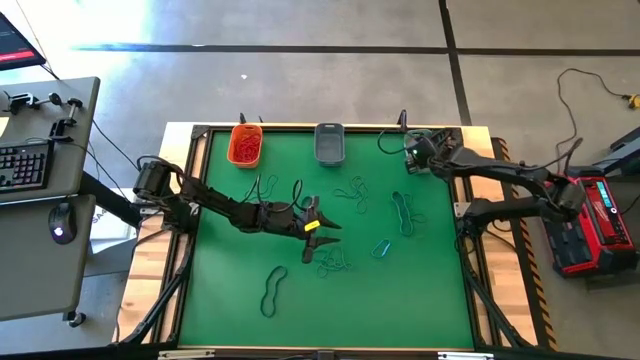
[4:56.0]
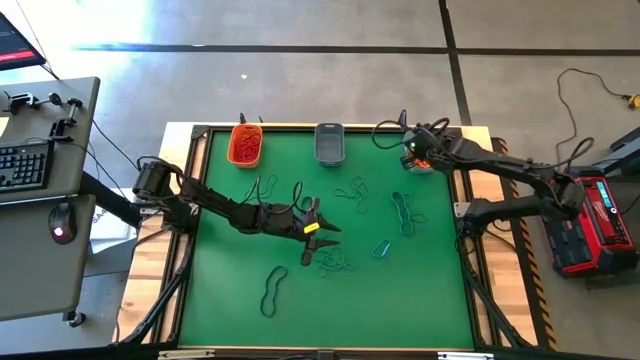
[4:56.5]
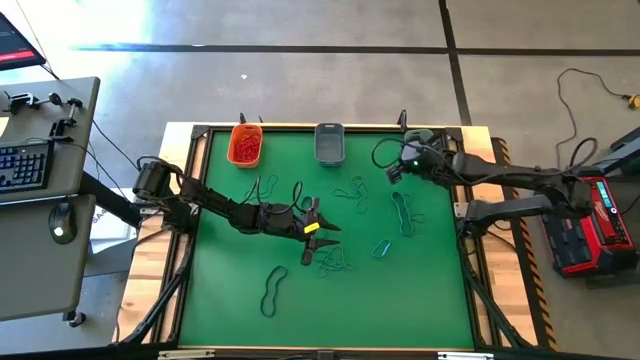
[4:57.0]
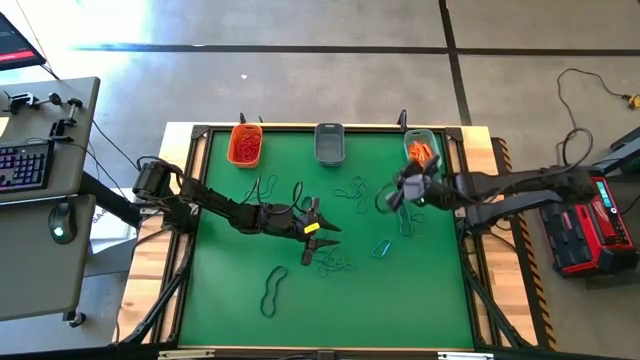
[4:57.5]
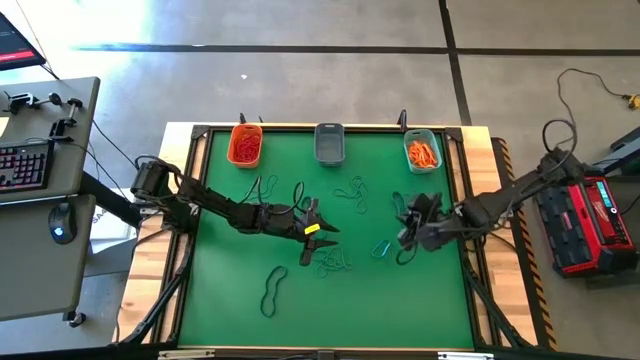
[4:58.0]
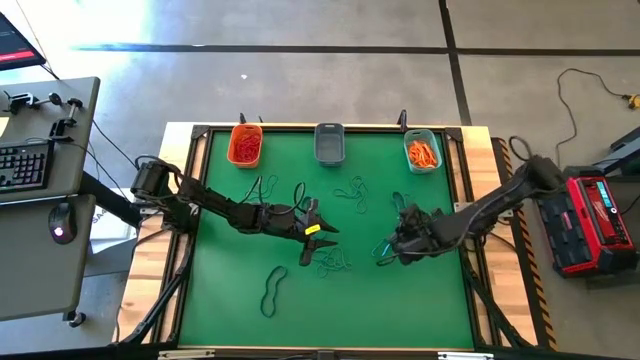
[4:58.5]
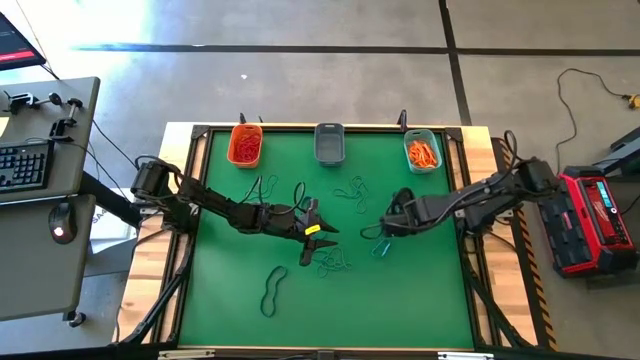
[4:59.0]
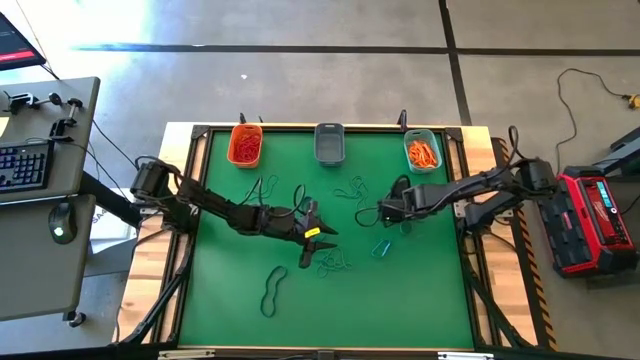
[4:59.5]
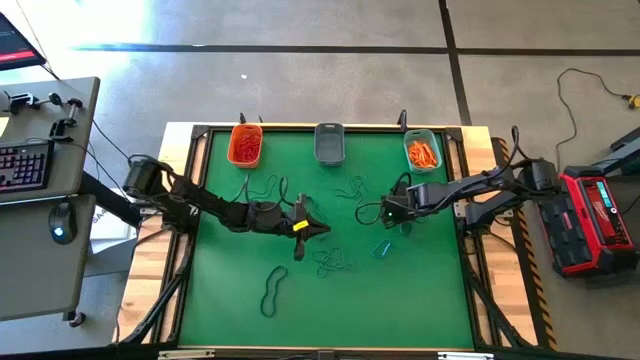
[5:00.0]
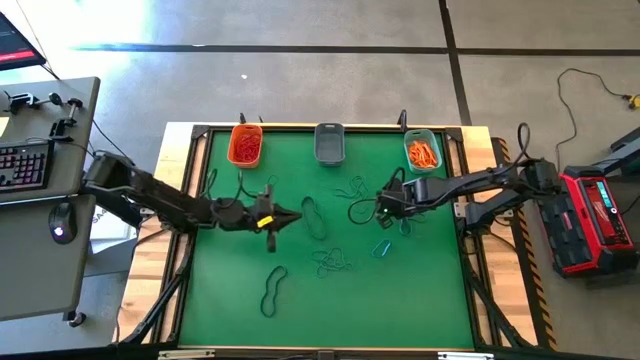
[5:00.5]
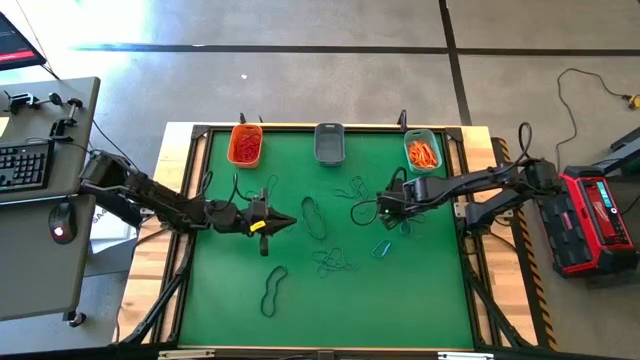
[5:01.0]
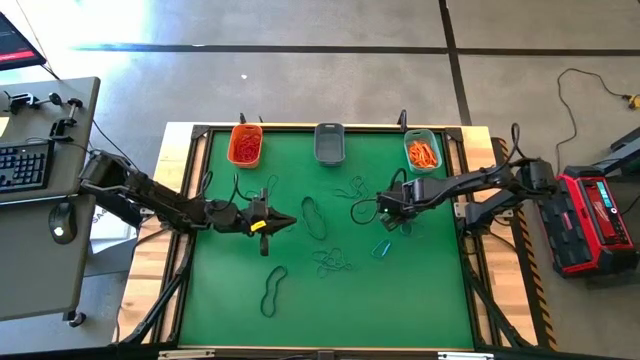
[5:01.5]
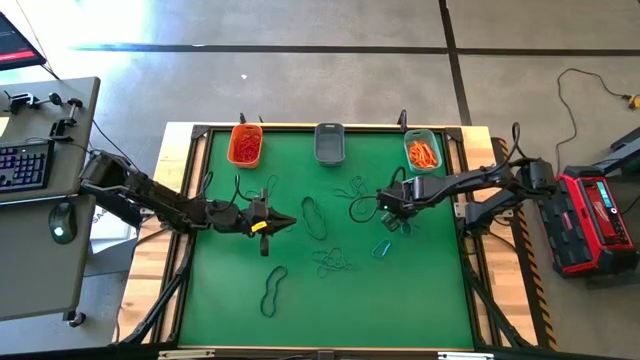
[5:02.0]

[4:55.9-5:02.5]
Task: Sort rubber bands into baskets
Put the blue rubber band into the blue bin

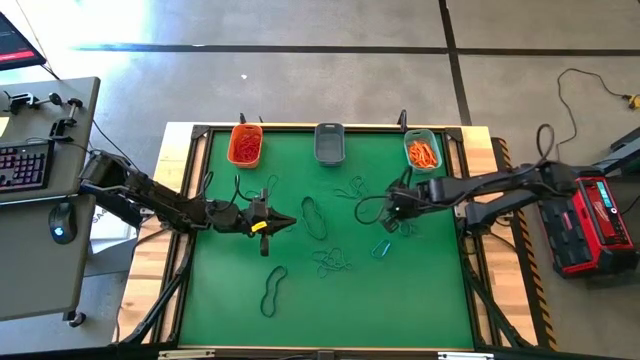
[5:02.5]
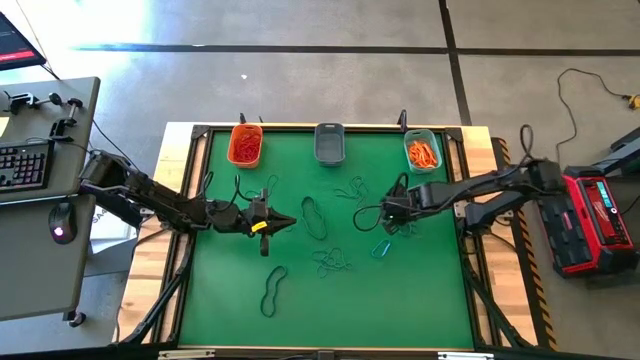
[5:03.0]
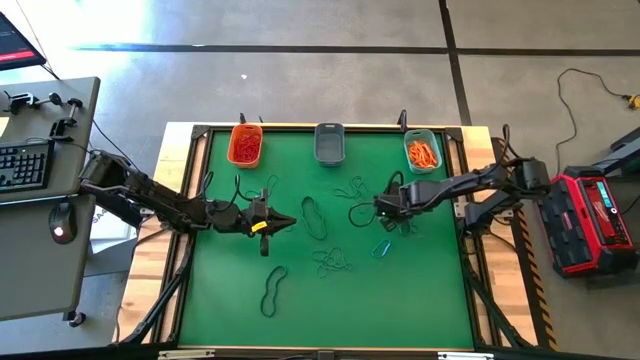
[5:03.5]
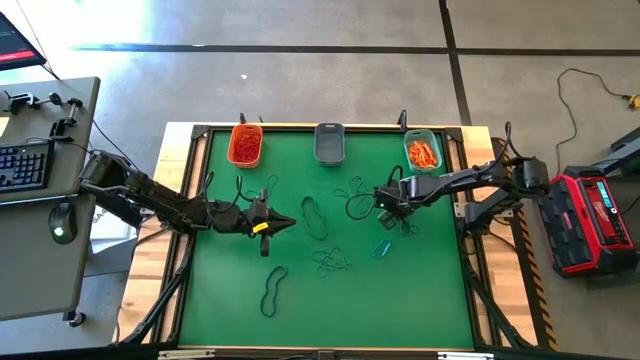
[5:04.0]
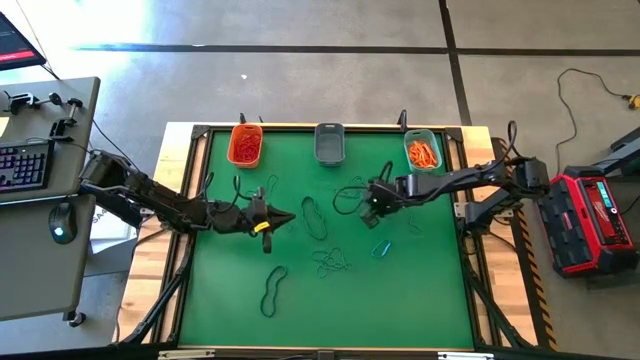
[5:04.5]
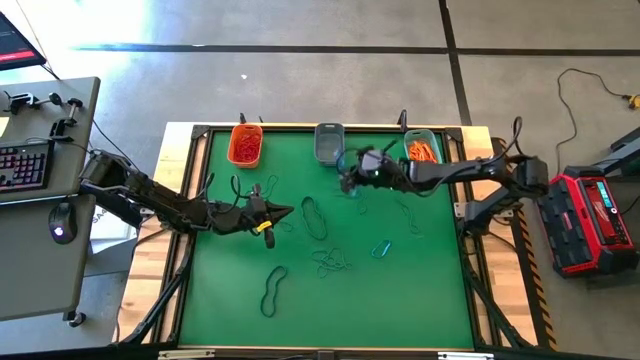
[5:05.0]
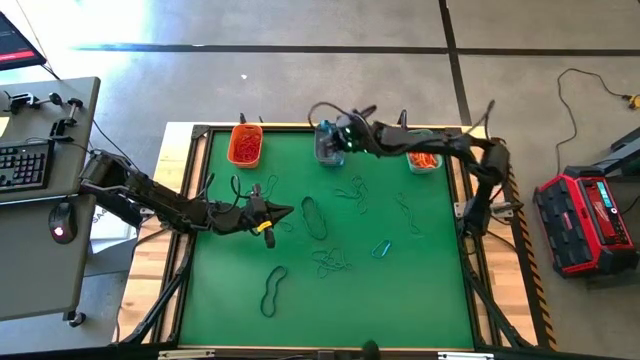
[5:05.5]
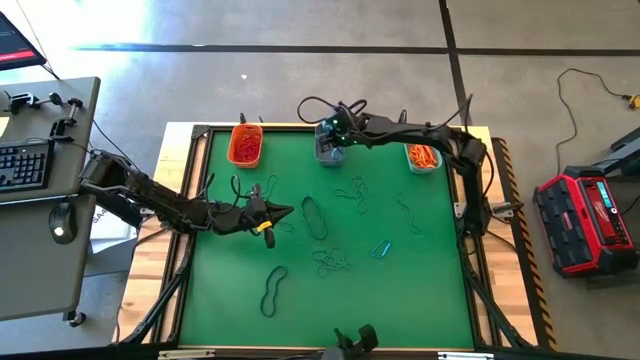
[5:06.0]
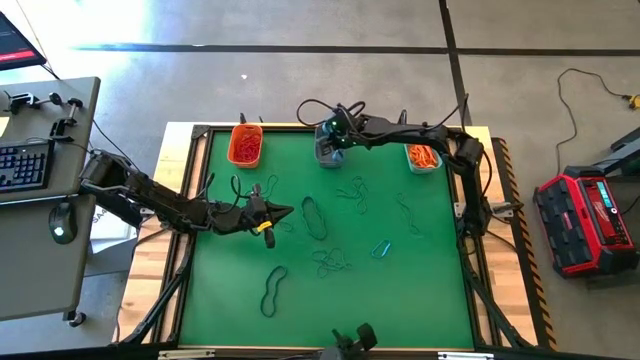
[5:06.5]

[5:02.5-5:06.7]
Put the blue rubber band into the blue bin

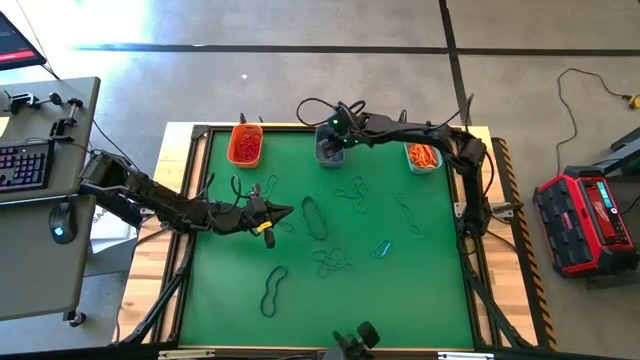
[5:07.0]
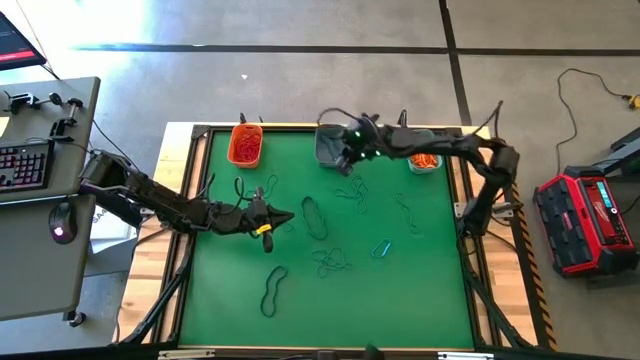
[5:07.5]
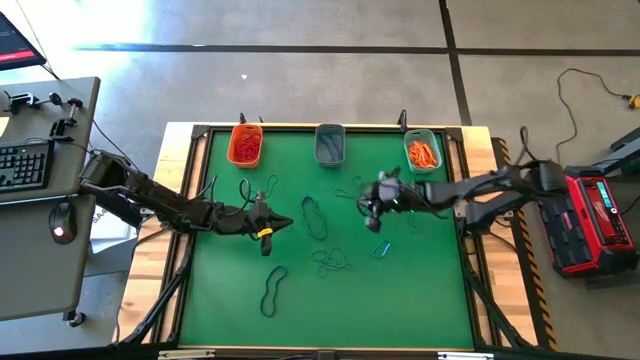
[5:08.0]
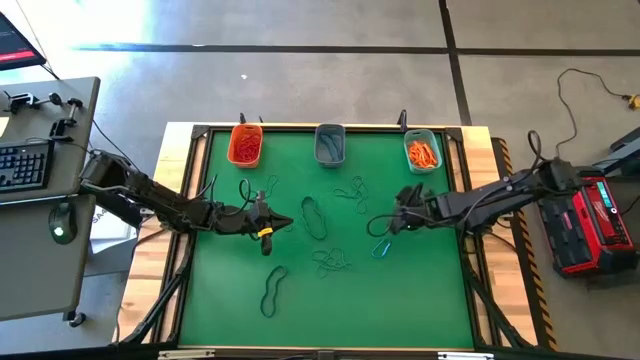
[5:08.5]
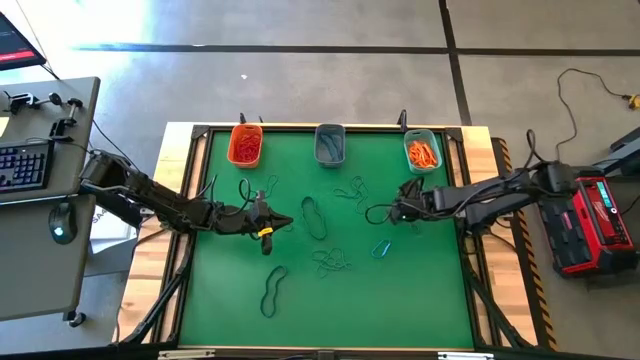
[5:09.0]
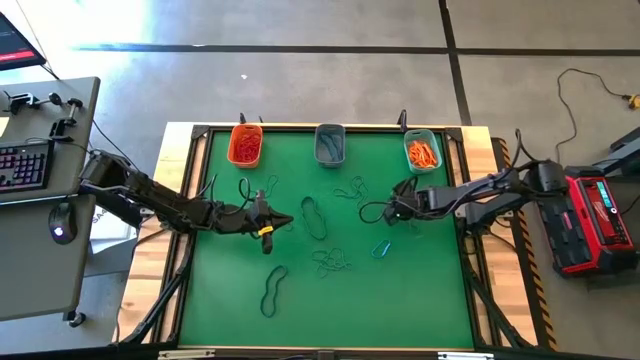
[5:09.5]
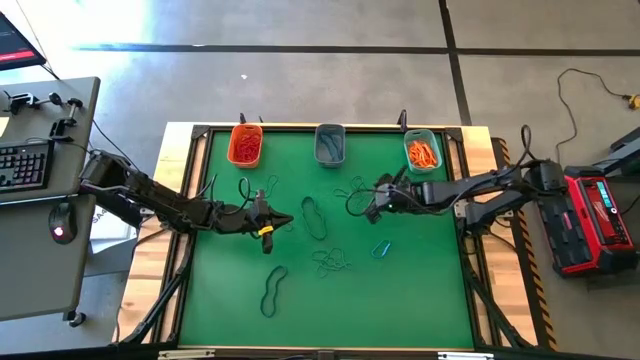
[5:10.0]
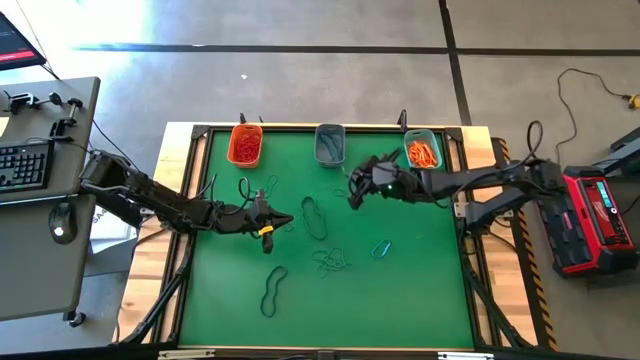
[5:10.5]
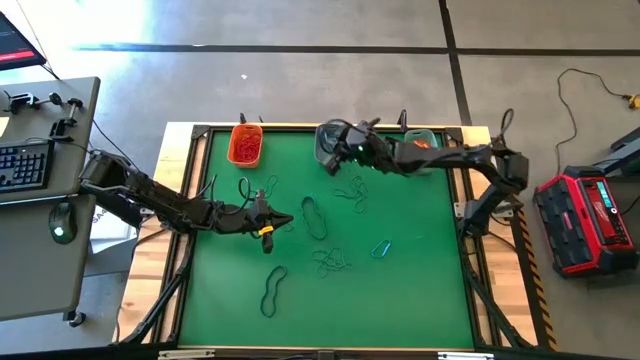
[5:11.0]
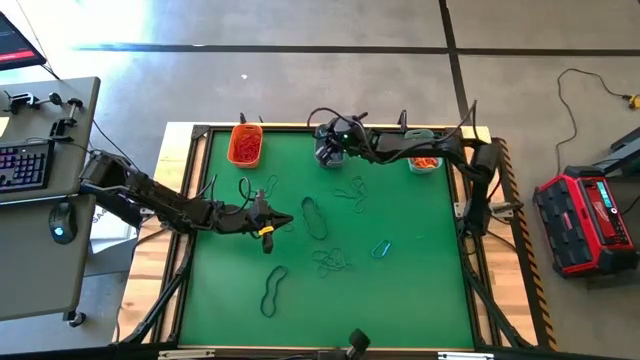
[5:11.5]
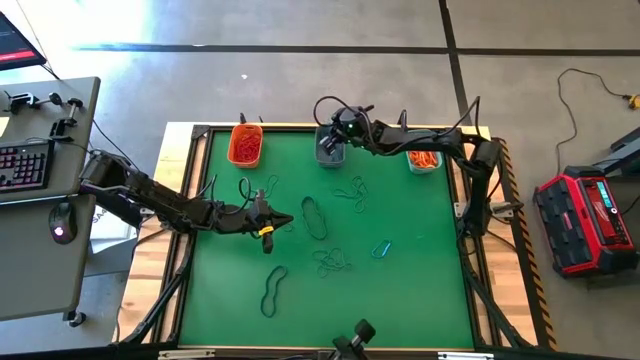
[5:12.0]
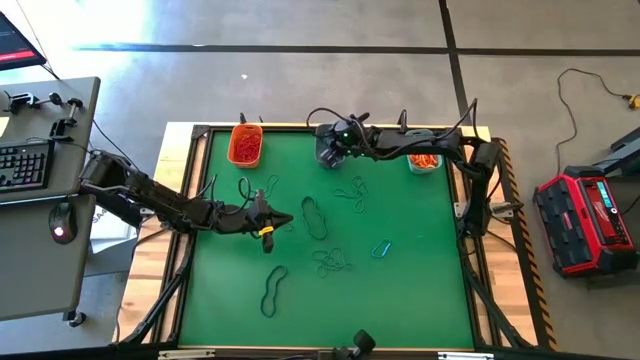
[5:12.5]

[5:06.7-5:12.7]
Put the blue rubber band into the blue bin

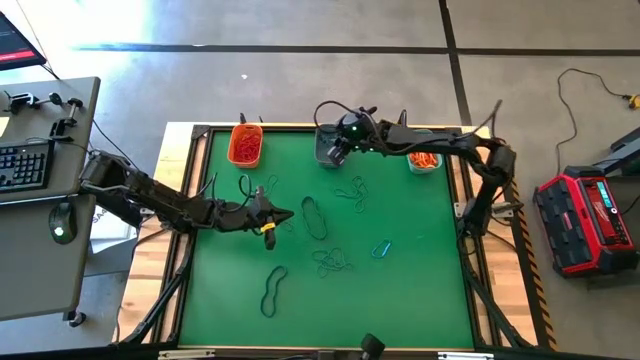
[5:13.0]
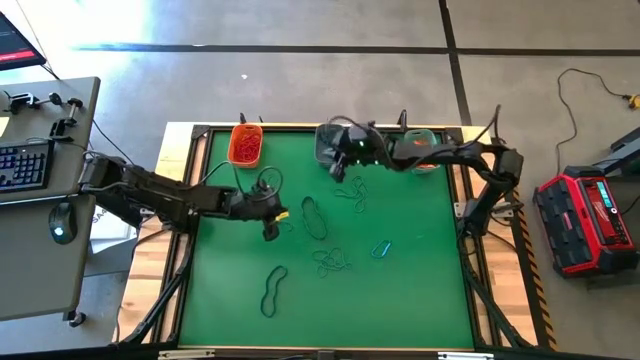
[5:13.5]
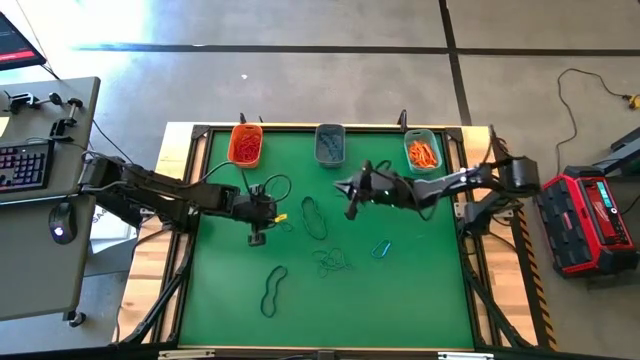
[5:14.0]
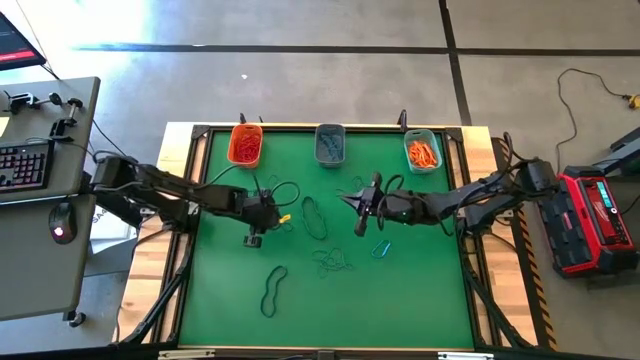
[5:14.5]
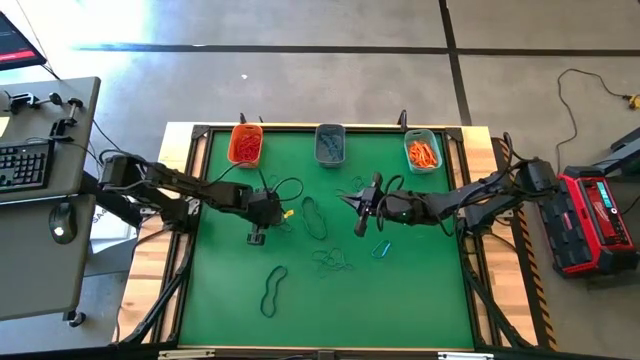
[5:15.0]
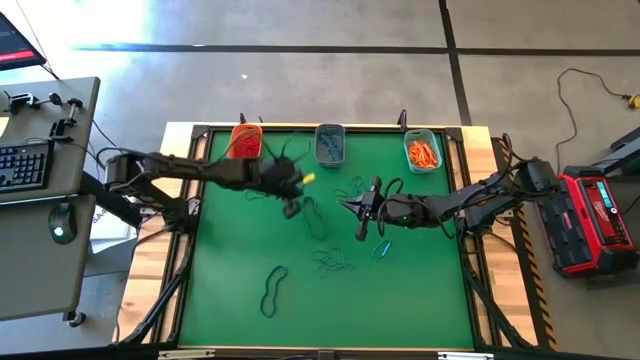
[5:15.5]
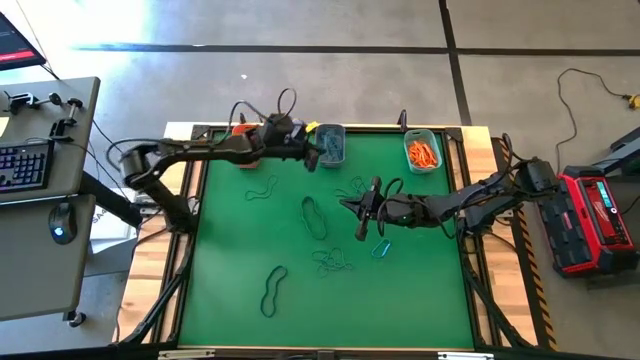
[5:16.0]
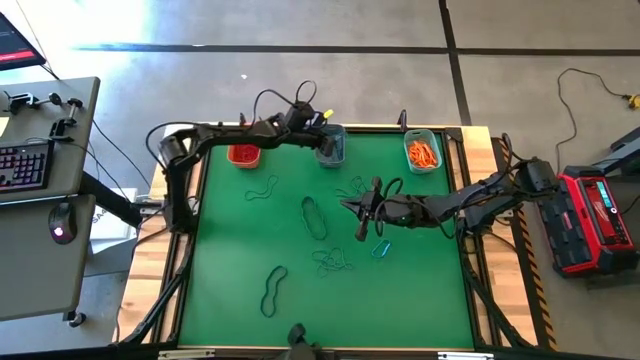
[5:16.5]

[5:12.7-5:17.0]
Put the blue rubber band into the blue bin

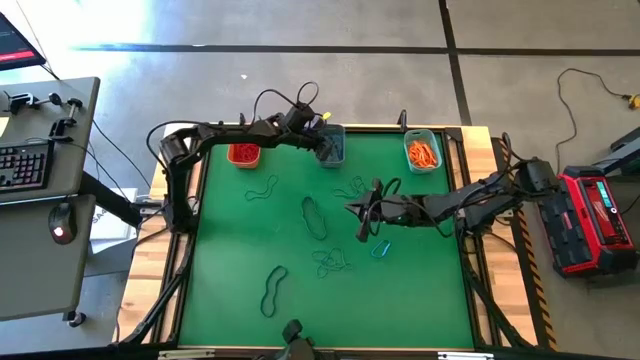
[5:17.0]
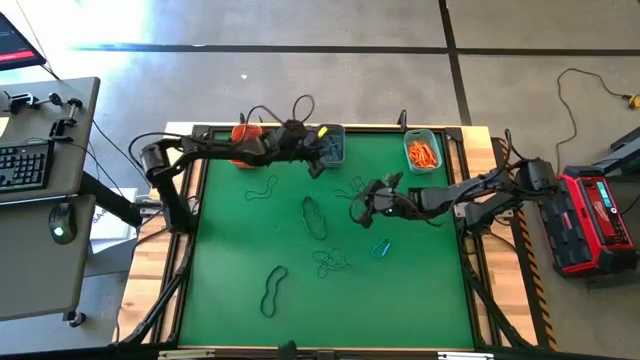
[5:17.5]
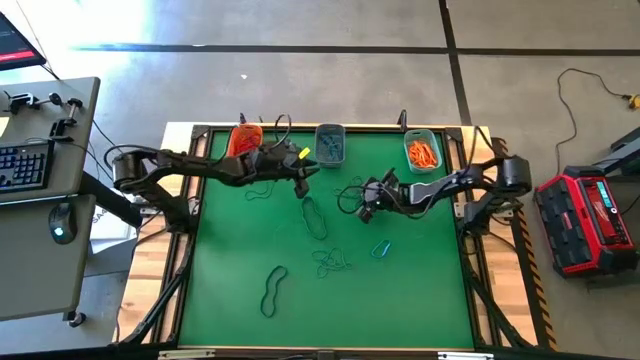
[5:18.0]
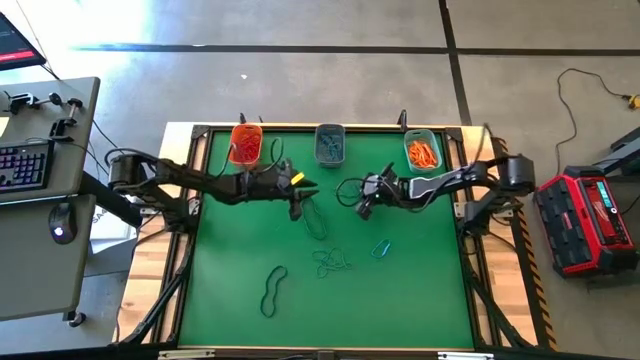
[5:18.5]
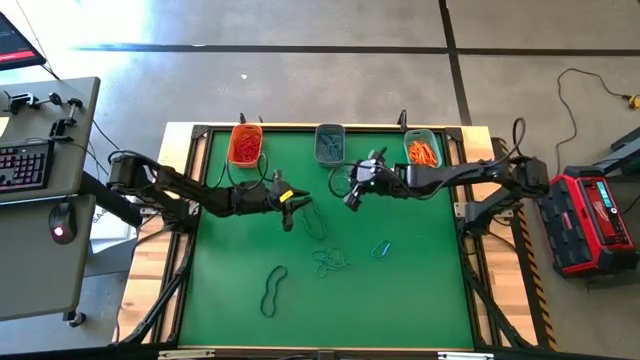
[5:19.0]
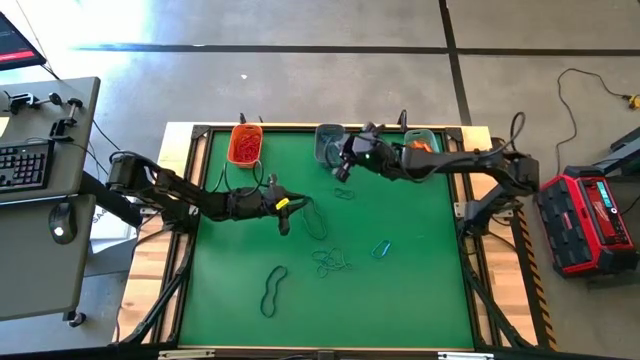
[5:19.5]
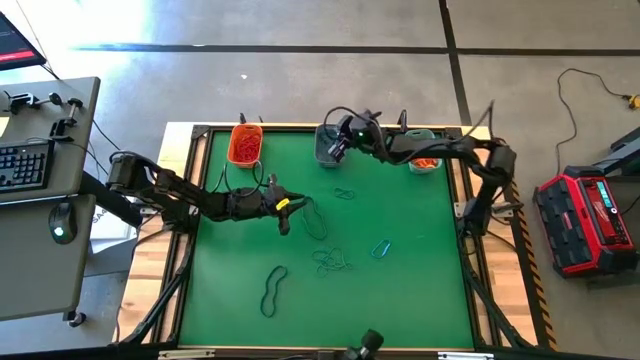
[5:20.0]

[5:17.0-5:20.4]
Put the blue rubber band into the blue bin
